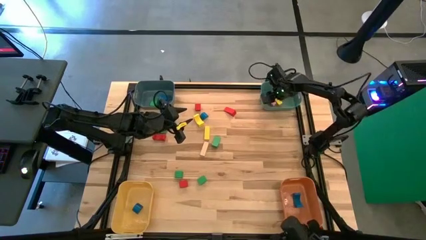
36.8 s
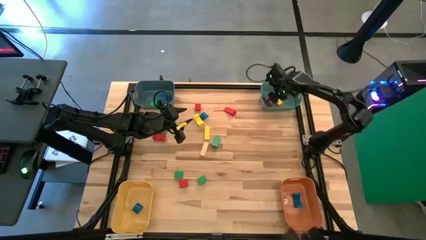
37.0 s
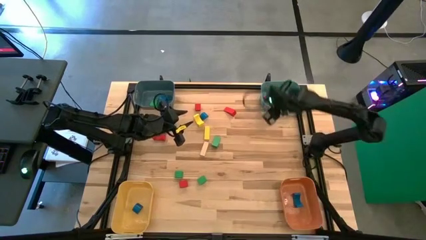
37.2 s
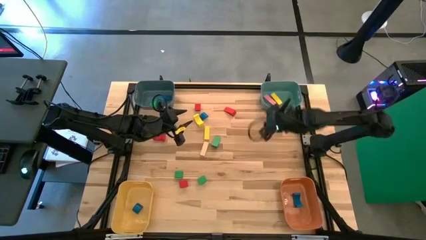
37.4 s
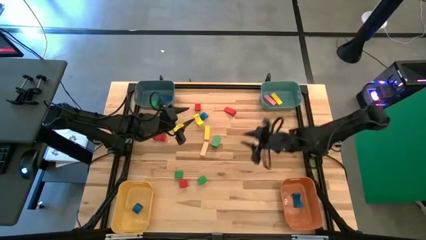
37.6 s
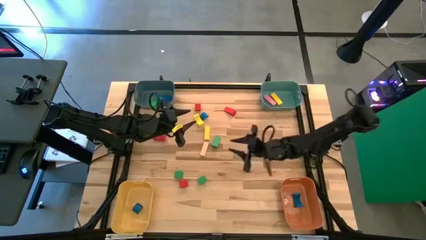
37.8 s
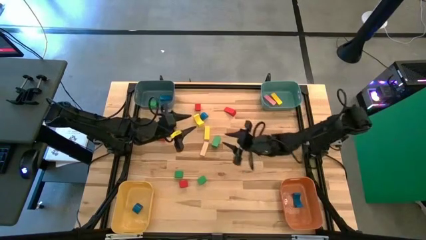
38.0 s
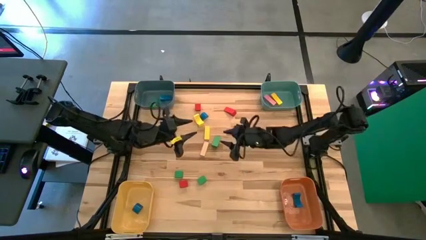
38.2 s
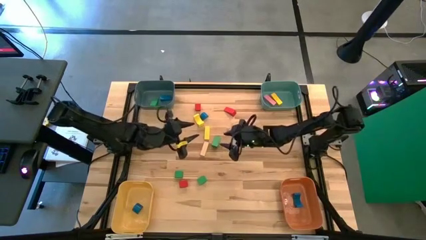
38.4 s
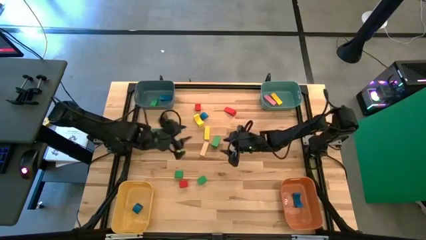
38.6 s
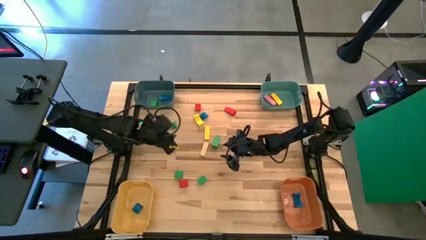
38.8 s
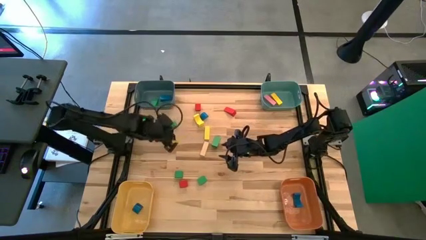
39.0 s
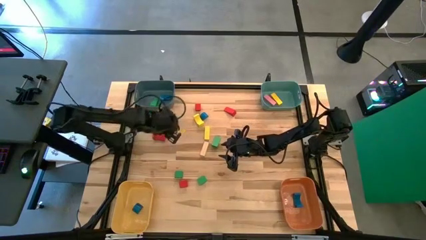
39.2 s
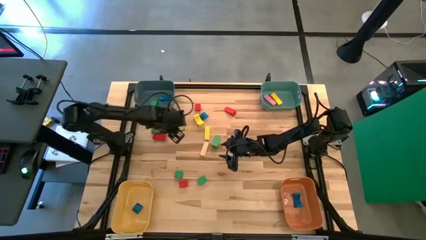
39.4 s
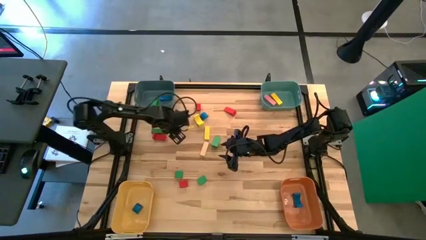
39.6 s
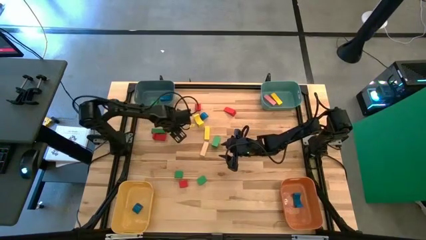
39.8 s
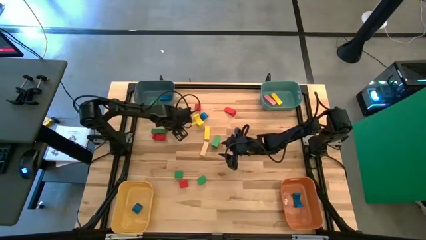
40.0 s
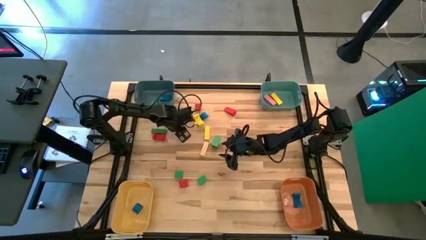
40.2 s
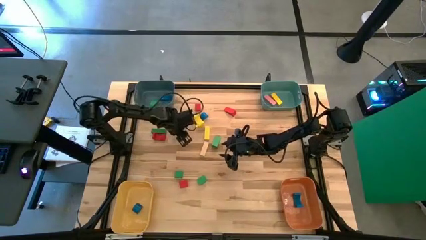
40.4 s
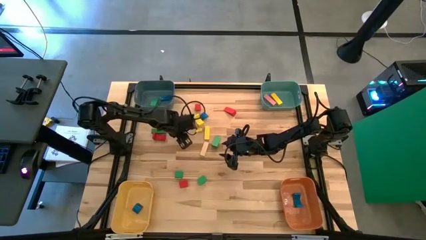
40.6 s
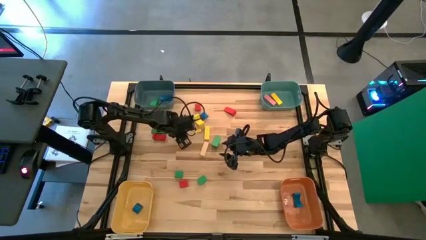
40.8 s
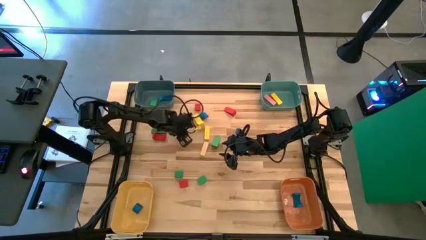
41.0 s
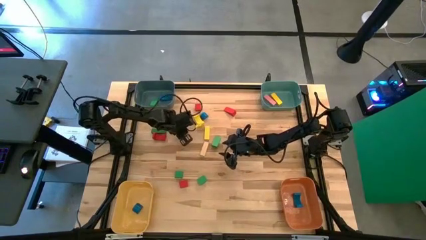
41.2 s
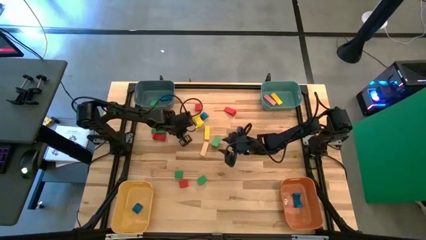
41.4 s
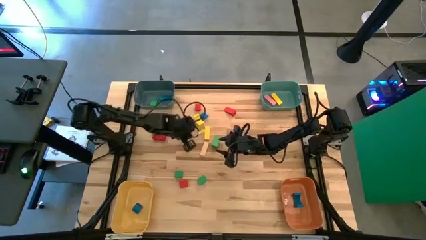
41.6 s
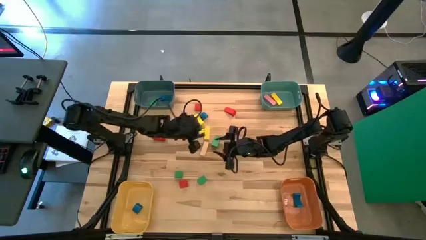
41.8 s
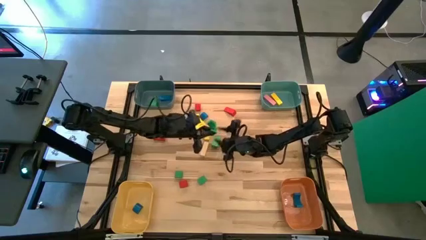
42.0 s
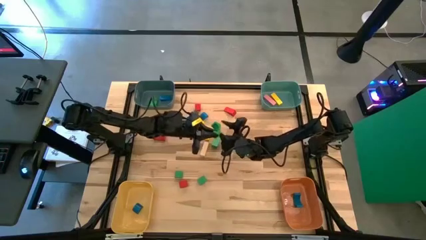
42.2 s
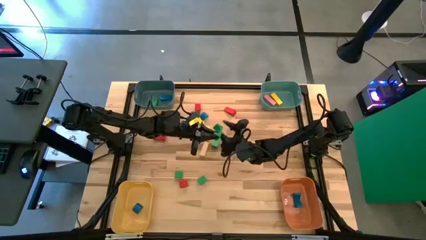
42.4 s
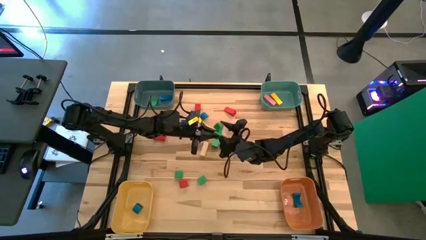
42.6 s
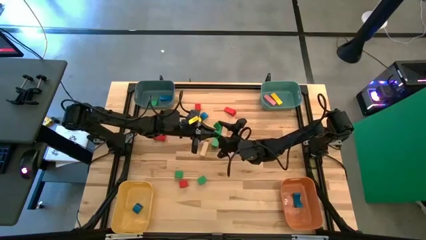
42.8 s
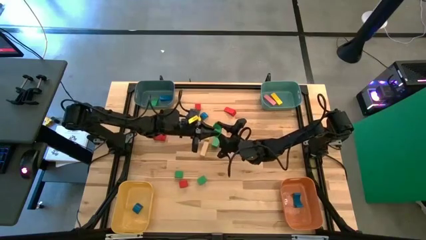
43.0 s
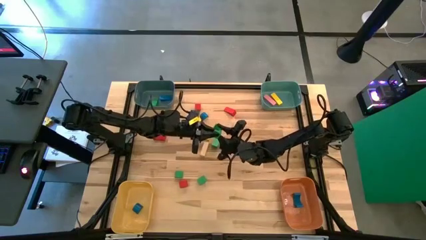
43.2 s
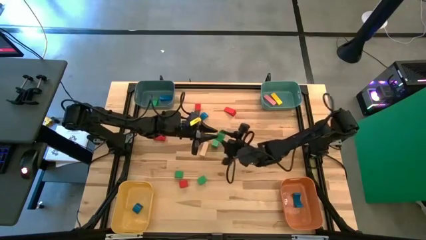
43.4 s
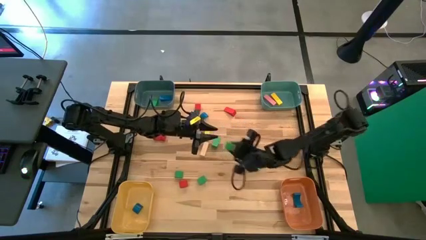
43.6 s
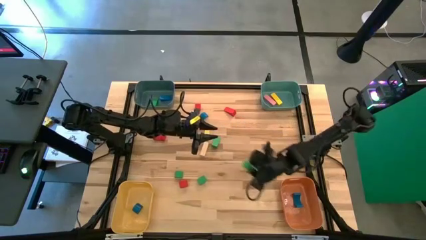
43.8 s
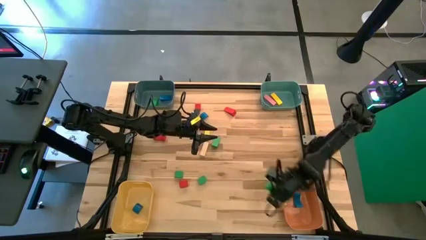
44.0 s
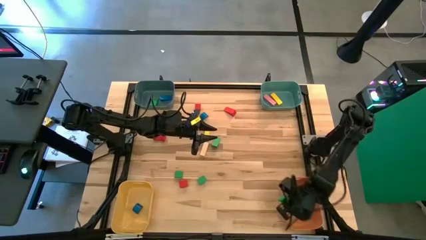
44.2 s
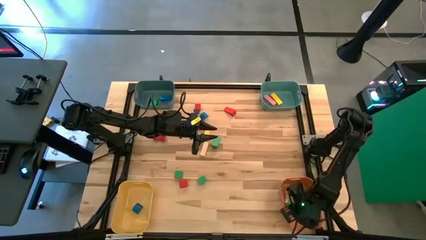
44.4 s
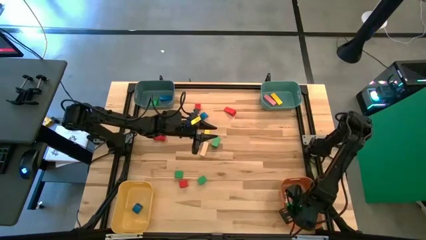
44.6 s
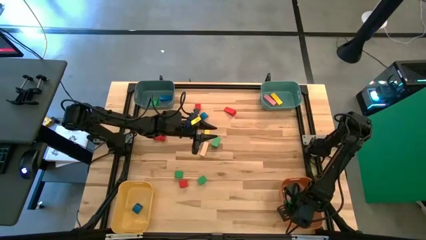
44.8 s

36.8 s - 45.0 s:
Task: Sort blocks by size
Put the green arch block into the orange bin

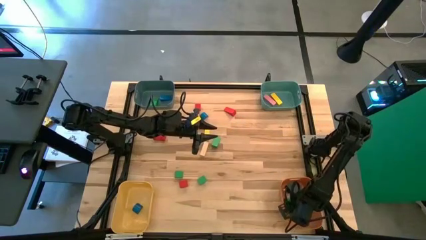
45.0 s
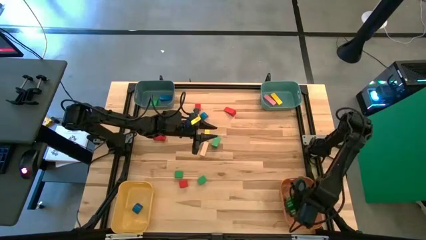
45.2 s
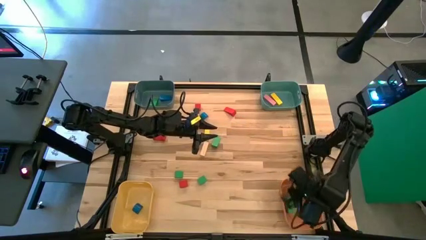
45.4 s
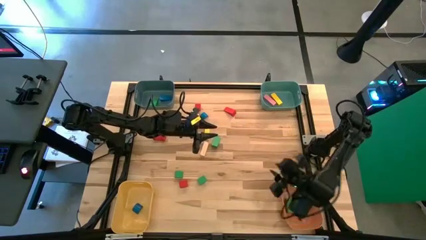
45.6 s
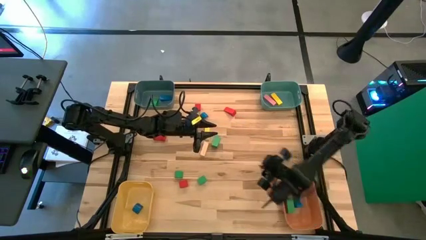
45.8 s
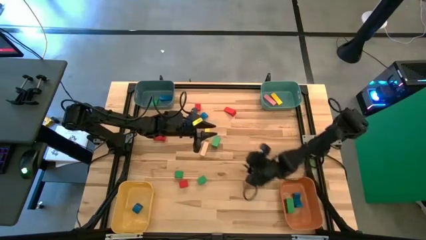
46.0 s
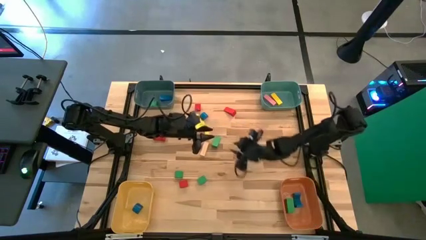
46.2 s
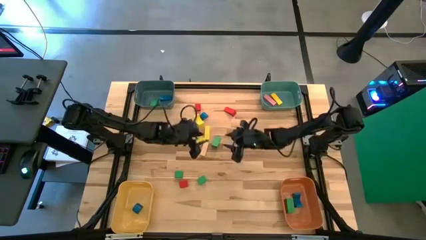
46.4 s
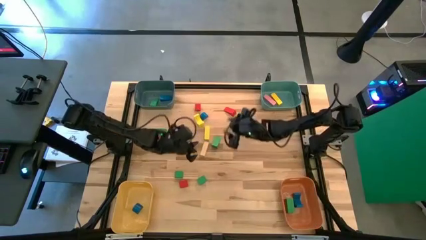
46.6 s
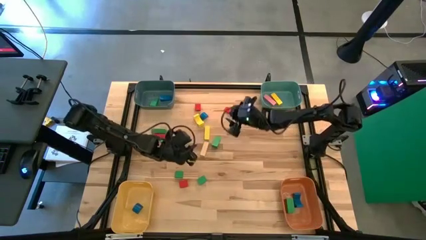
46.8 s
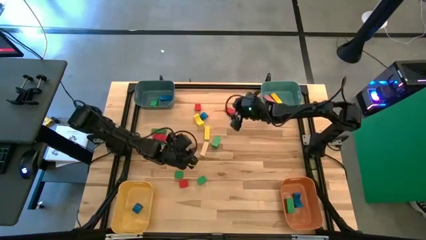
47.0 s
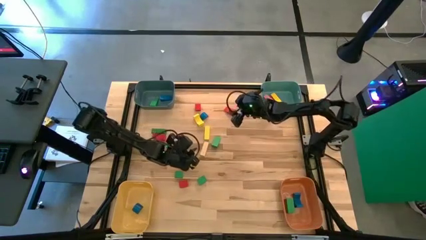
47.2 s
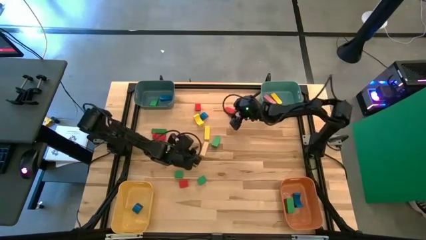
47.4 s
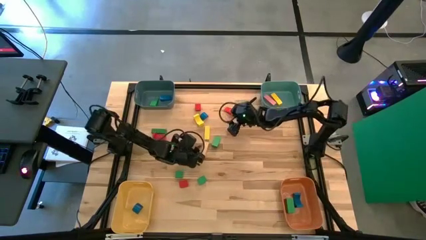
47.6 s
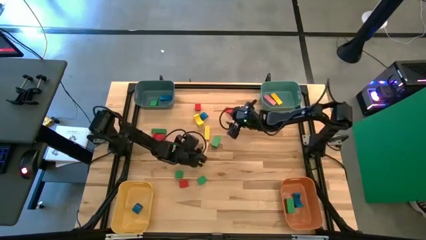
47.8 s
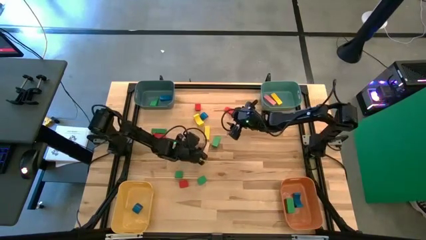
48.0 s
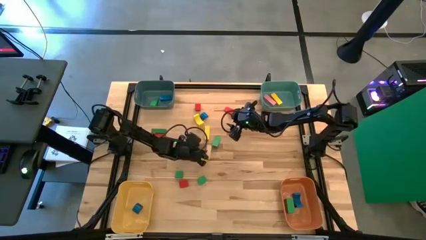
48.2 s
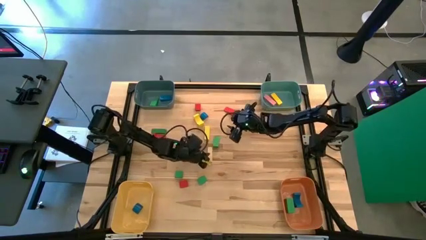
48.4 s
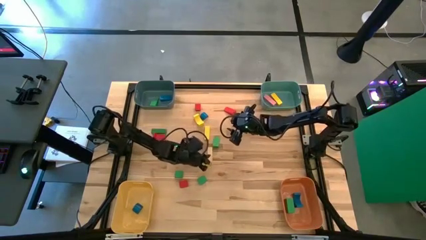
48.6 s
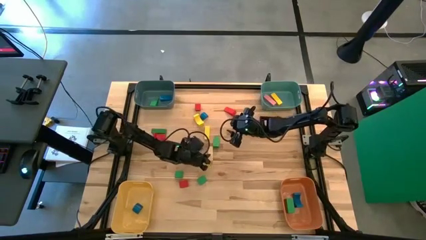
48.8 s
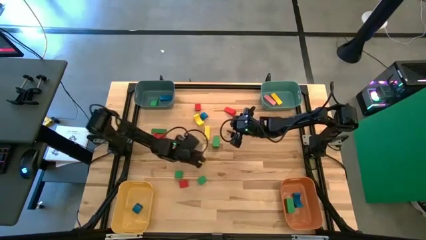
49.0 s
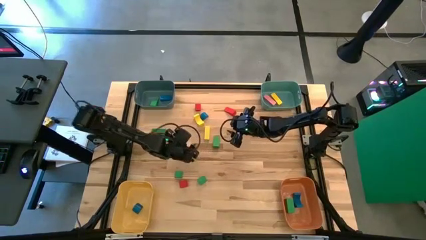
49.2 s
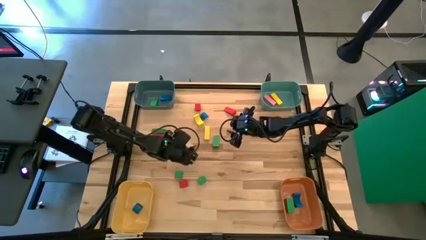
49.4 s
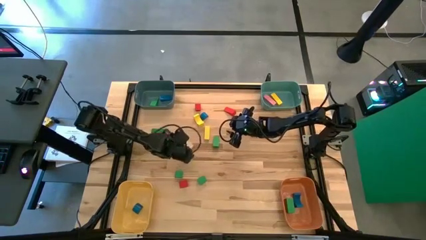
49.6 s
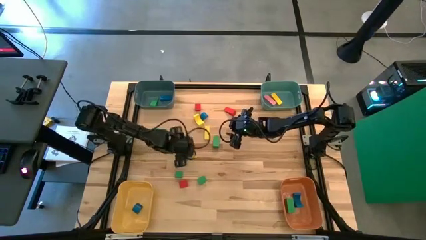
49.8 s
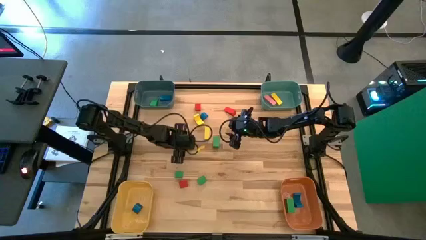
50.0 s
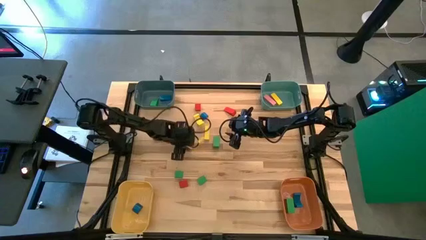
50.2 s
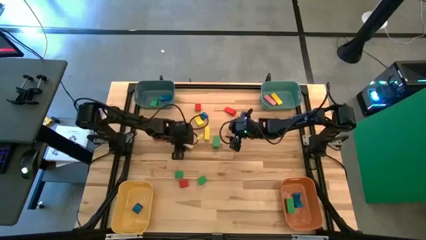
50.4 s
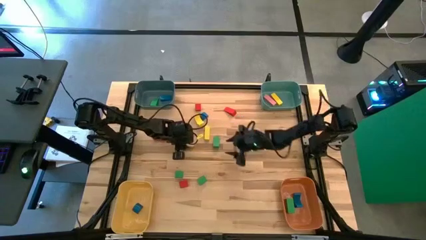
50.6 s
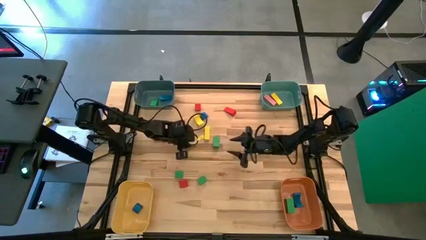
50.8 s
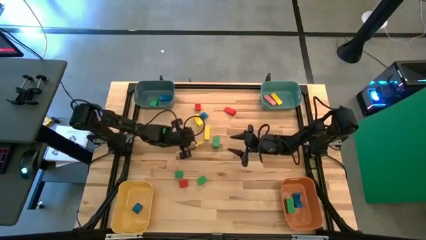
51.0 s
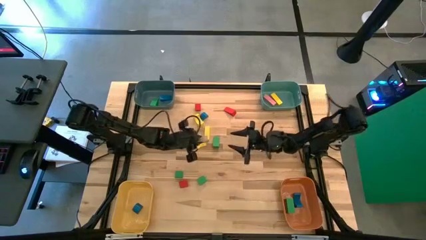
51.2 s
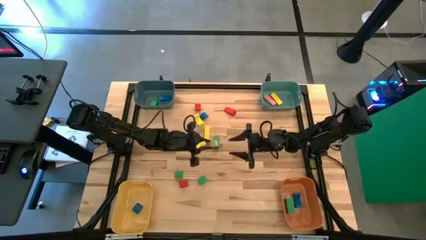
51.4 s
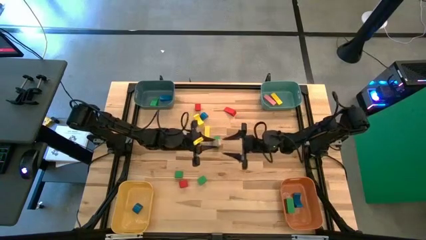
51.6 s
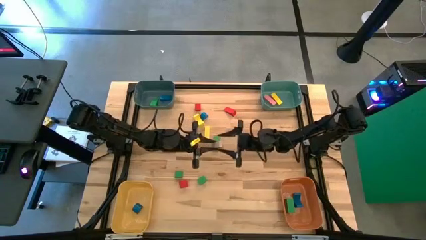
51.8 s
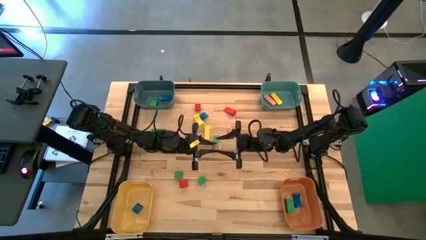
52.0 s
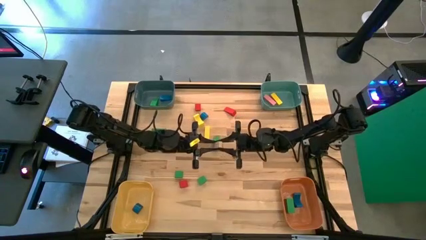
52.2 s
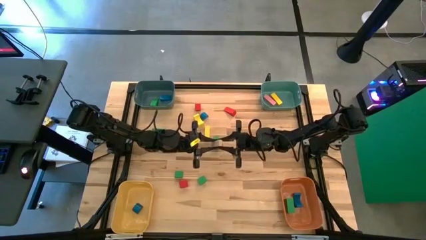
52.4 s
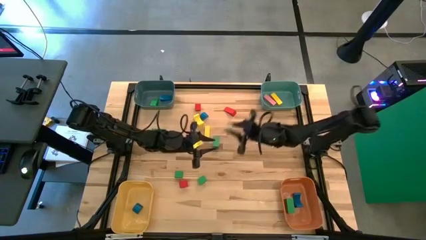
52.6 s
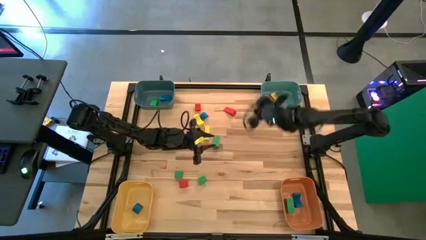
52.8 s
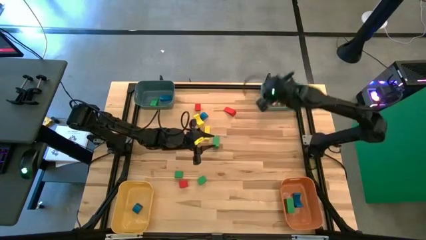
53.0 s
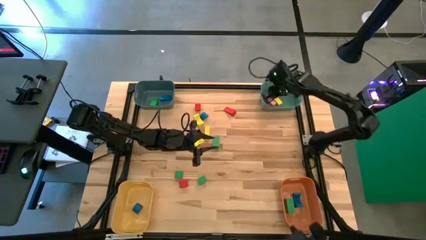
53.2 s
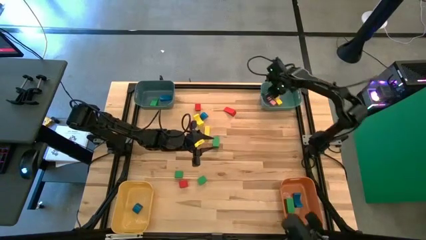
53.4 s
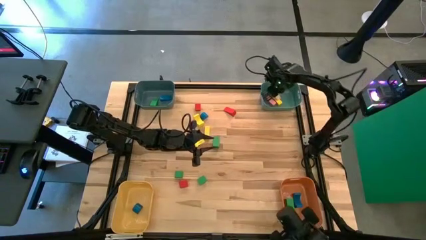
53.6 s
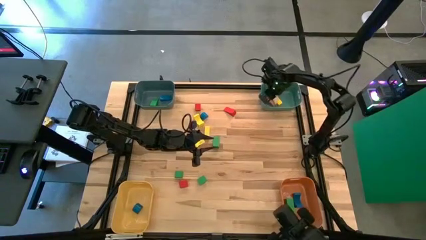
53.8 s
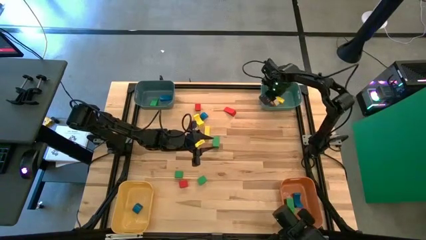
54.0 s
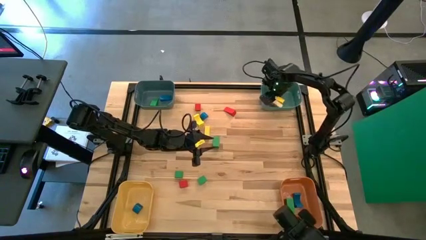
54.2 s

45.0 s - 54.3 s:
Put the brown rectangular block into the green bin
